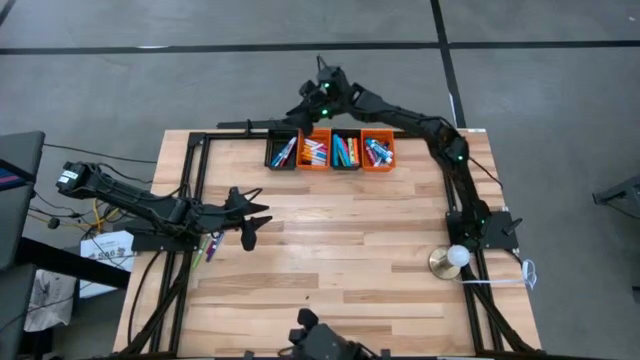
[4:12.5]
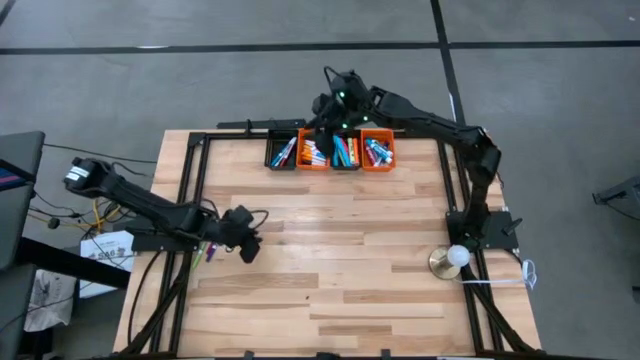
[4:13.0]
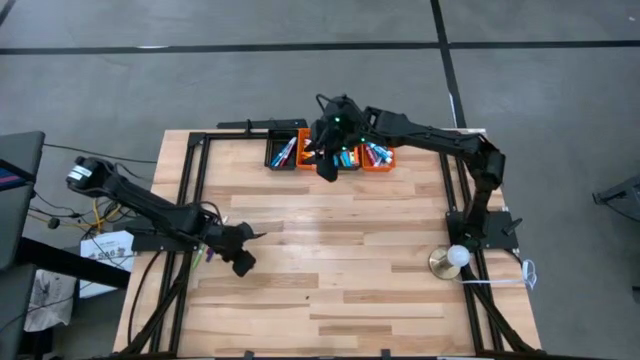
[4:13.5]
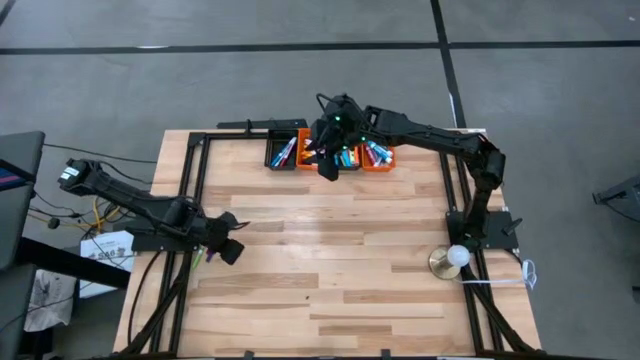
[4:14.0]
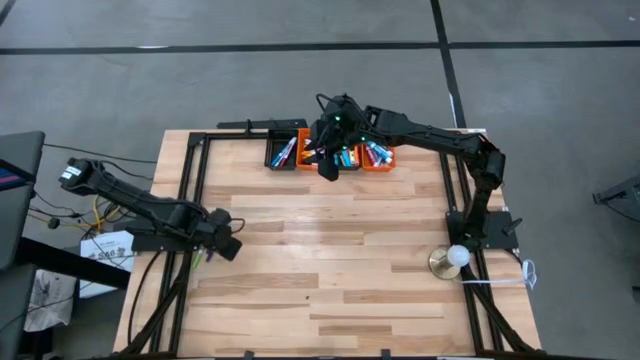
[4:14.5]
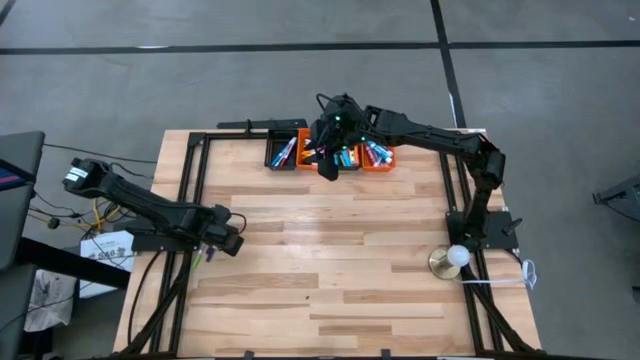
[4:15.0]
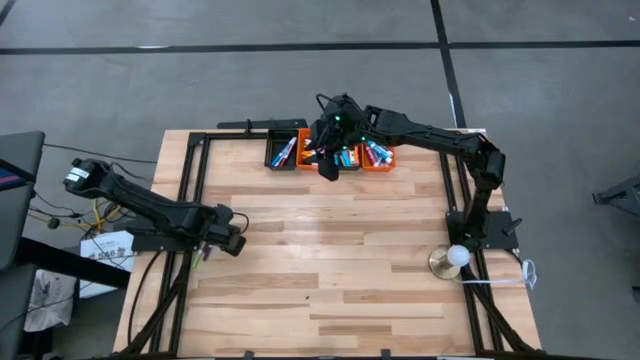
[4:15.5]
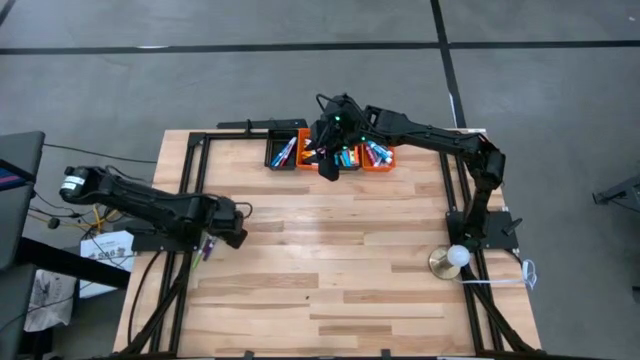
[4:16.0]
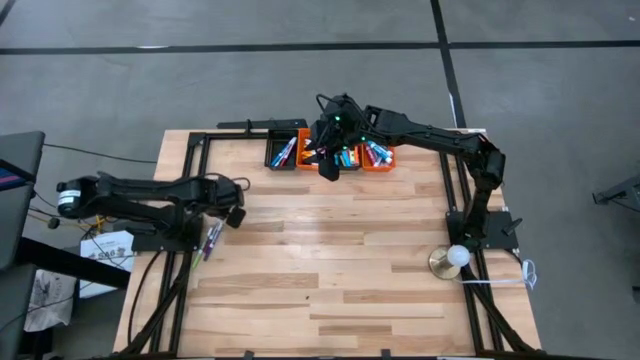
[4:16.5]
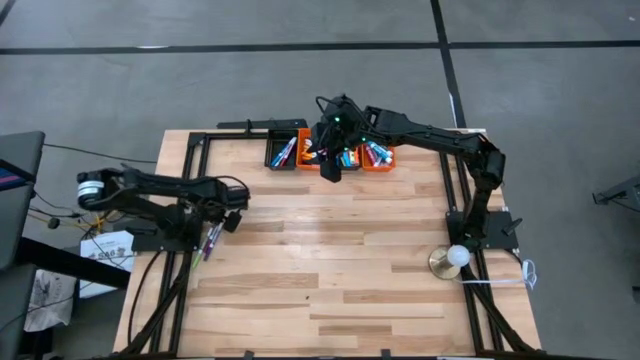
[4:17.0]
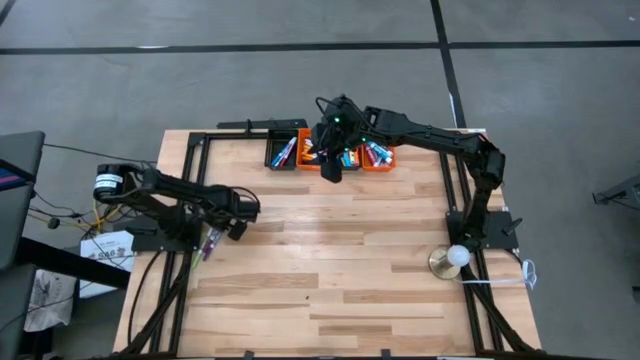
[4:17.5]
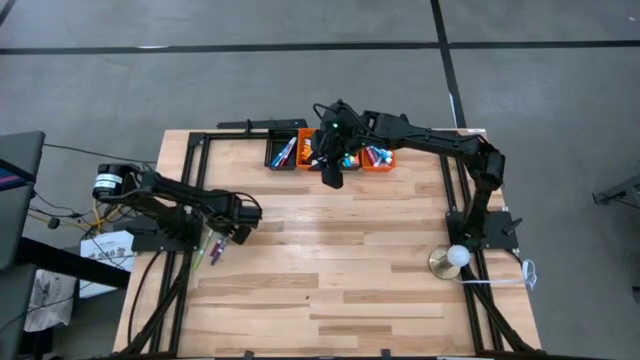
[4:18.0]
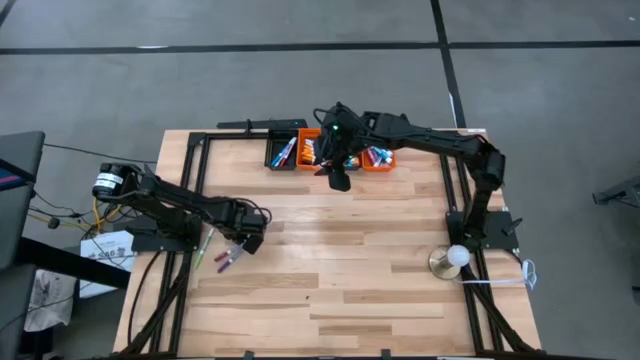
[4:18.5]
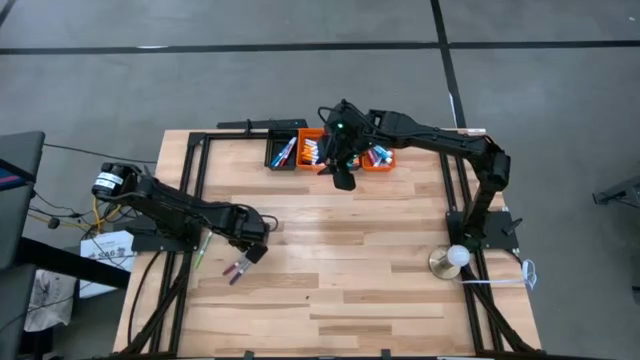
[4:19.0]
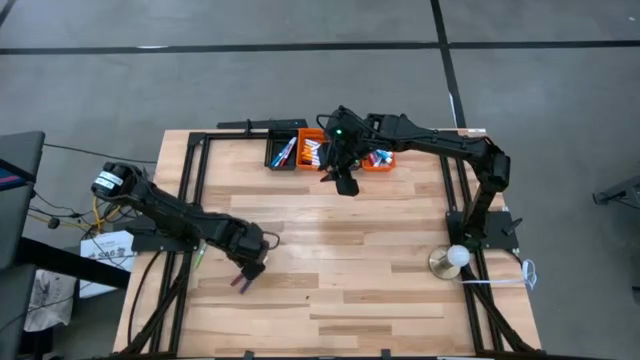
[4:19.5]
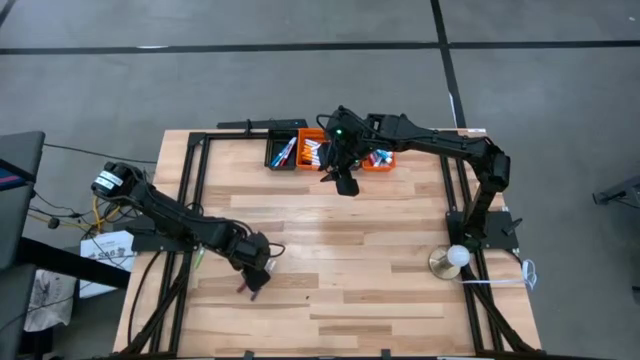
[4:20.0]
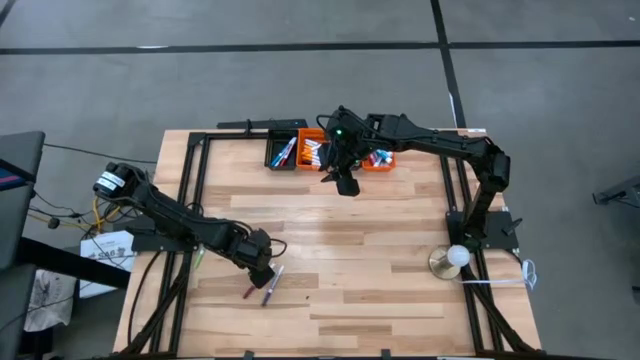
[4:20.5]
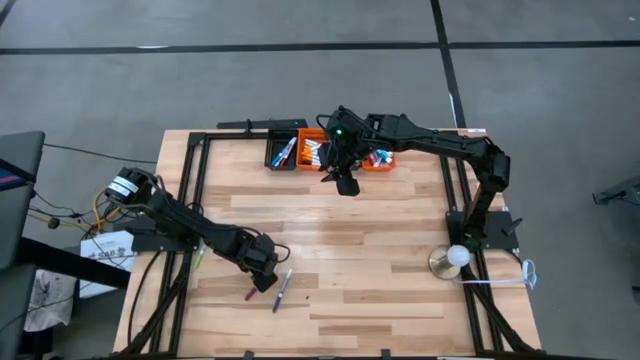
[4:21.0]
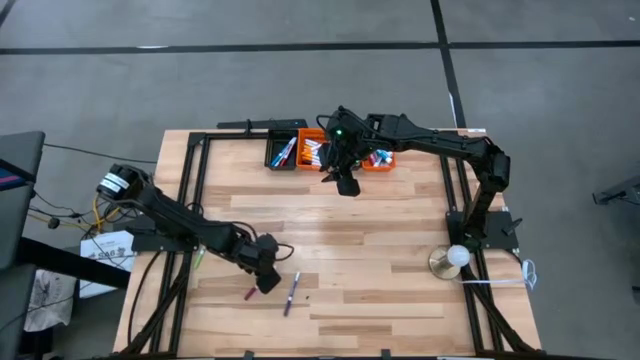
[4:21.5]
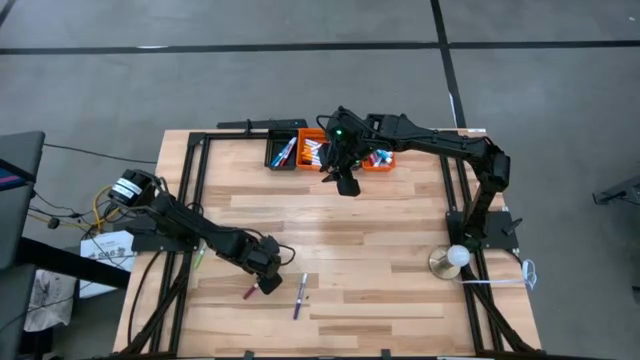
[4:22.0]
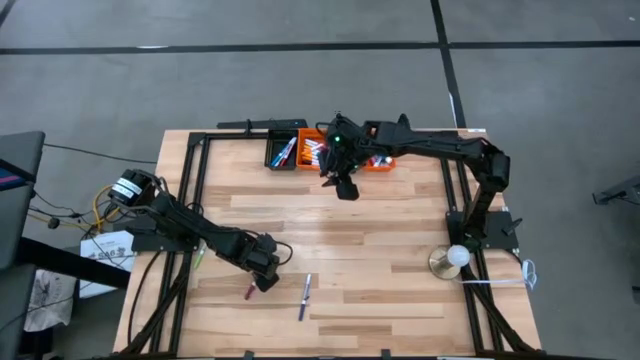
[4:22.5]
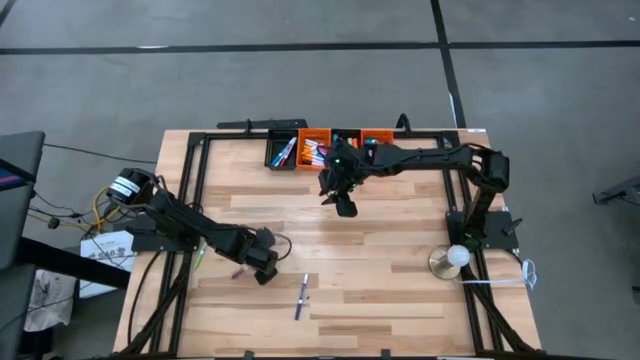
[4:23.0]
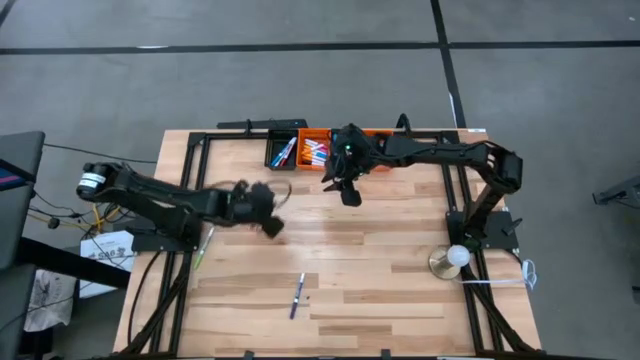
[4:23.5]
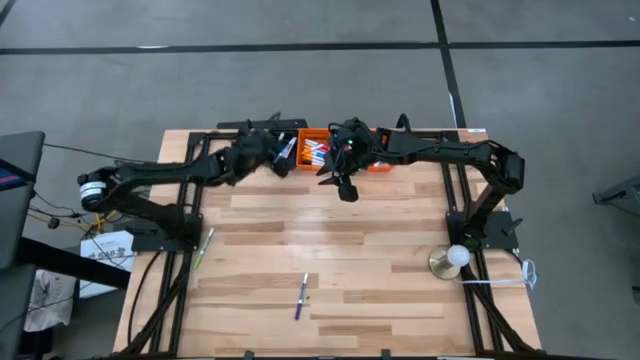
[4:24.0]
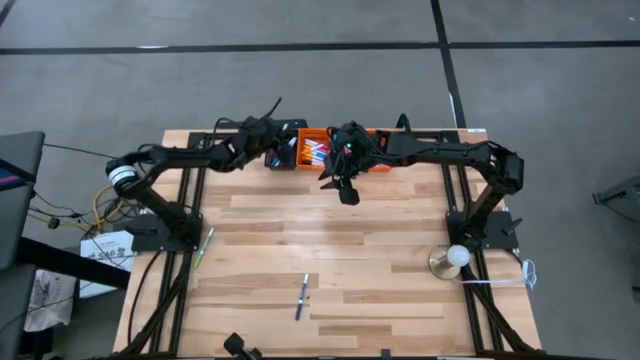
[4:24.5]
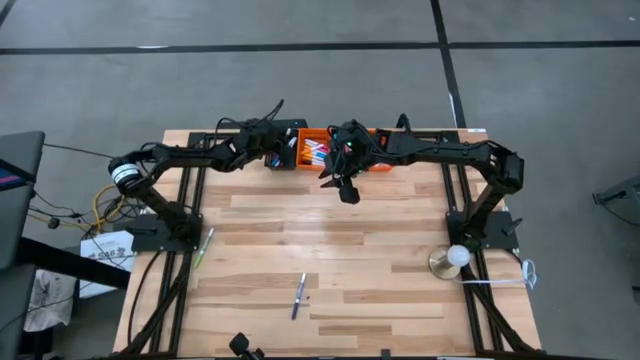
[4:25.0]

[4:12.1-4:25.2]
Task: Pick & Place Markers
Put the purple and white marker pen into the left black bin

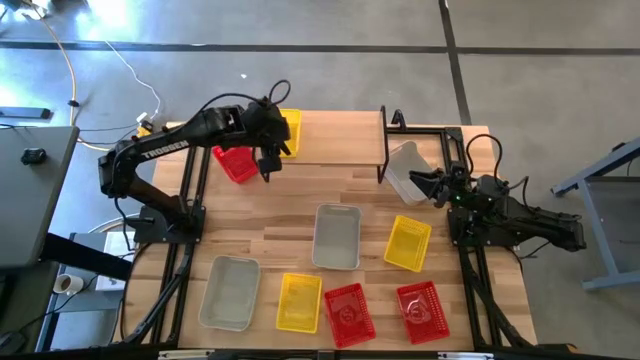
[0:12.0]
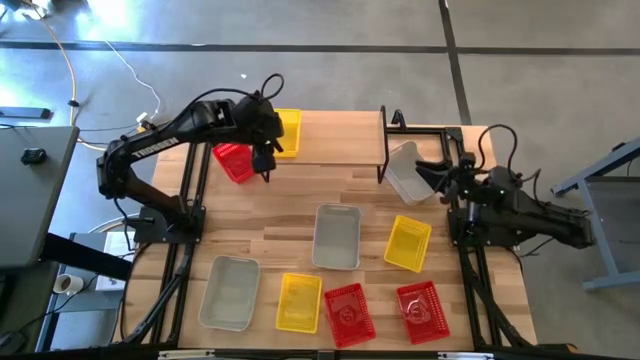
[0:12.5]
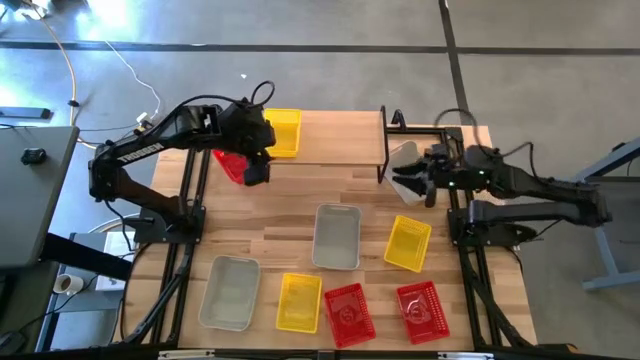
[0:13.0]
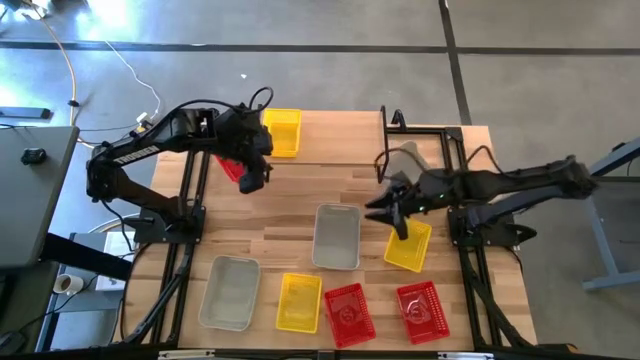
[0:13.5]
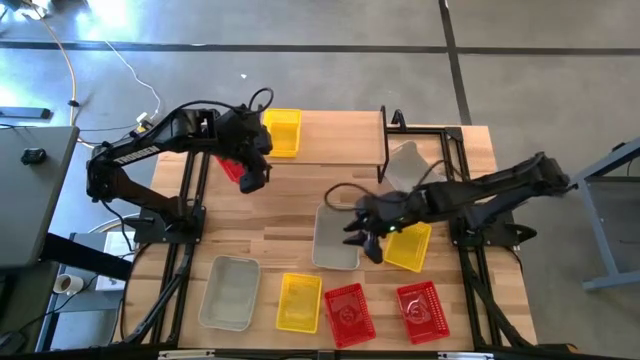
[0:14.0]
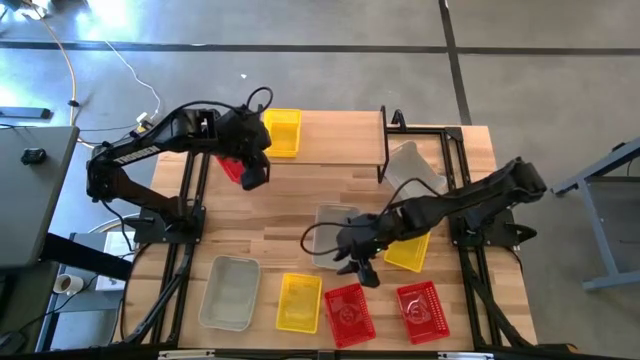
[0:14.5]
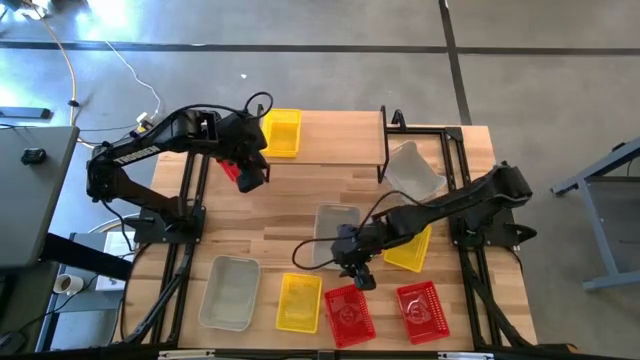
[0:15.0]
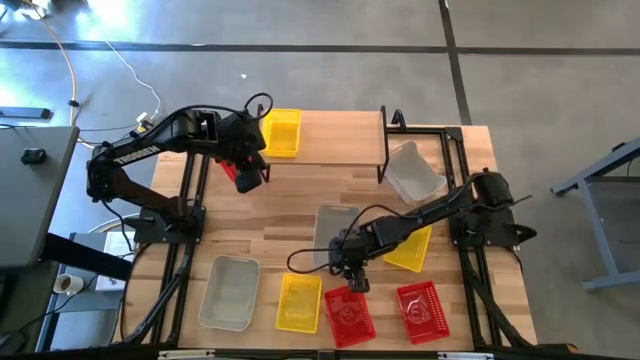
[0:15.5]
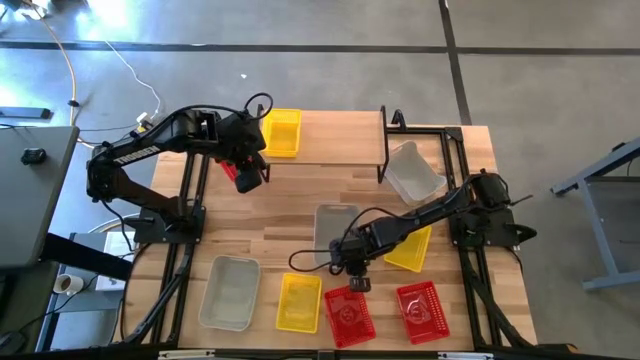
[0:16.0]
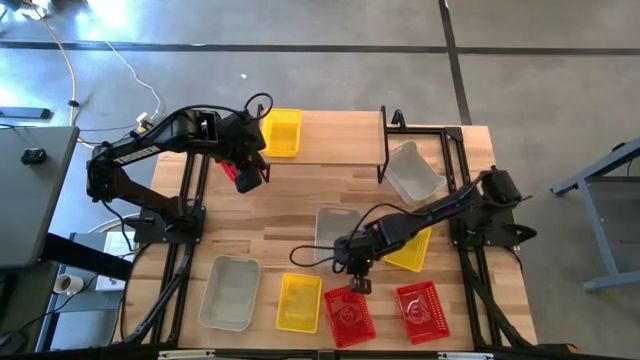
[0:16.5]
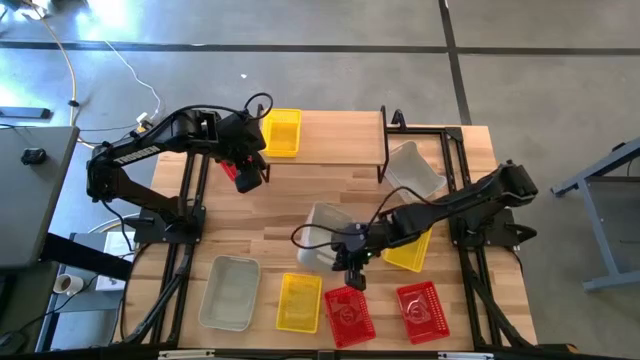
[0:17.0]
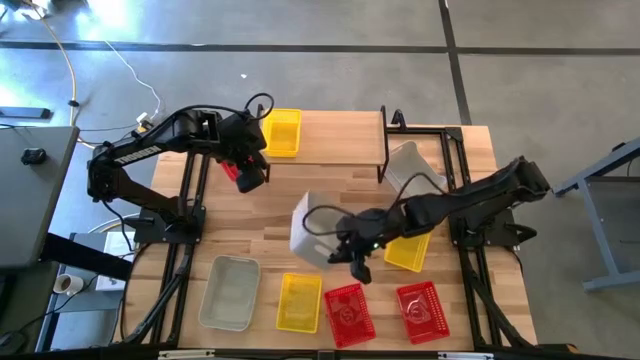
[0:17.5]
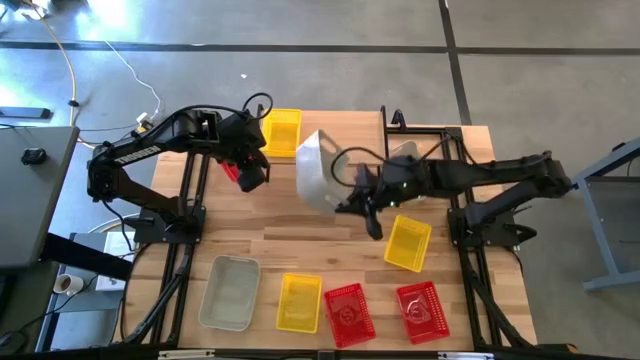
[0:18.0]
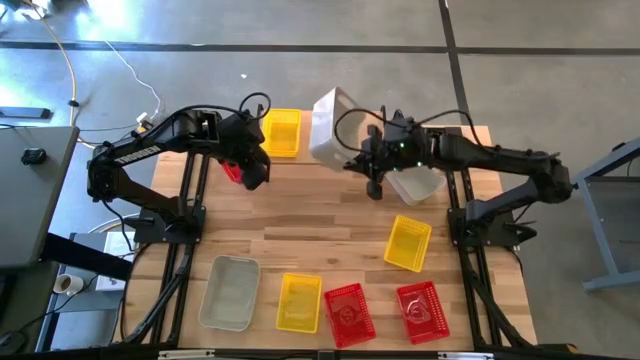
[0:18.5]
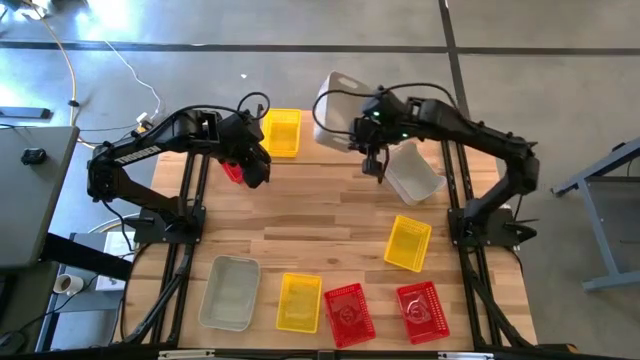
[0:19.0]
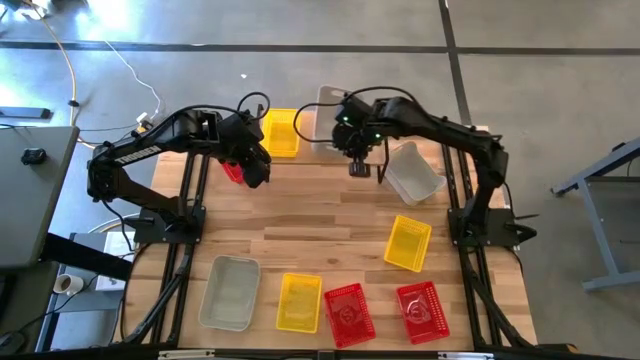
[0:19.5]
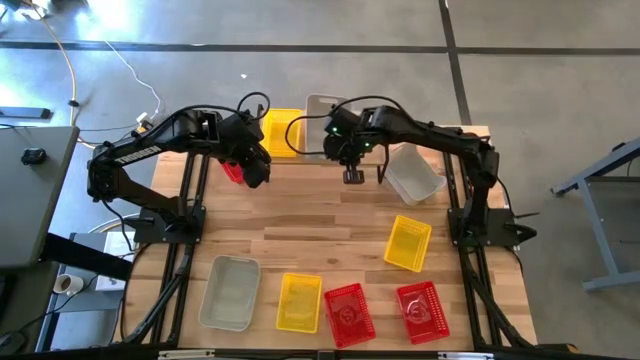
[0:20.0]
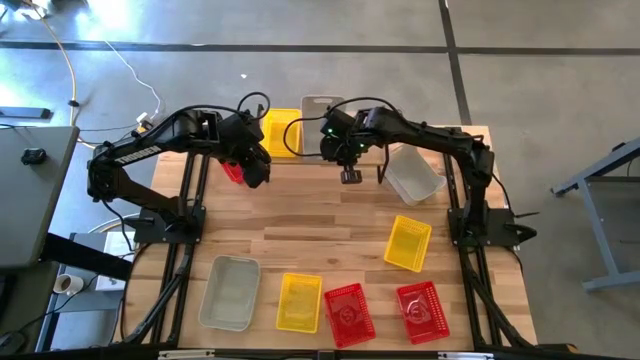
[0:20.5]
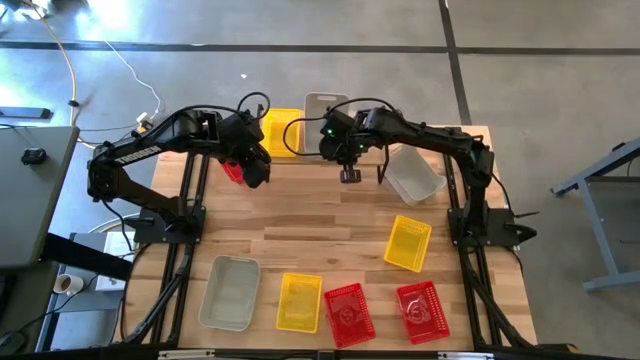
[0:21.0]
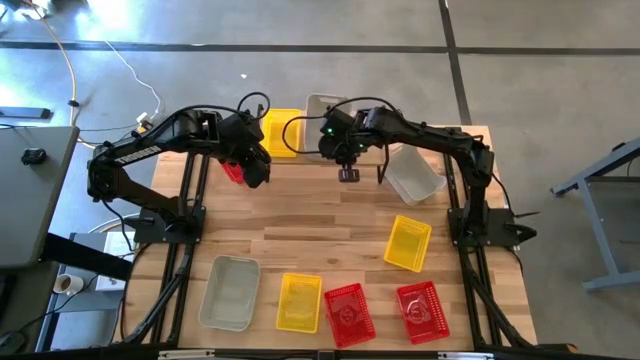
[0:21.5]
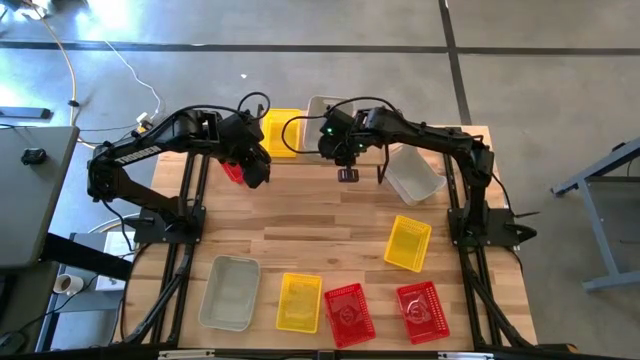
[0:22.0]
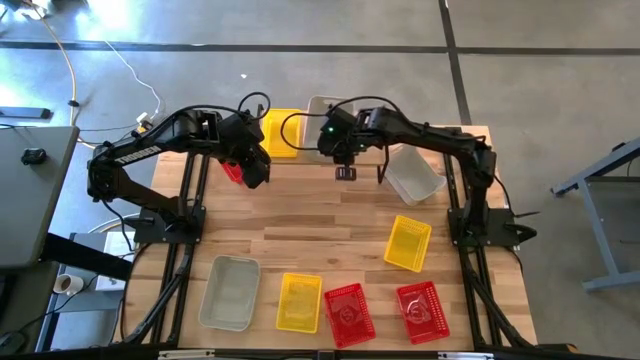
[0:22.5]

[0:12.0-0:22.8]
Task: Stack baskets on shelf by color
Put the middle gray bin on the shelf
